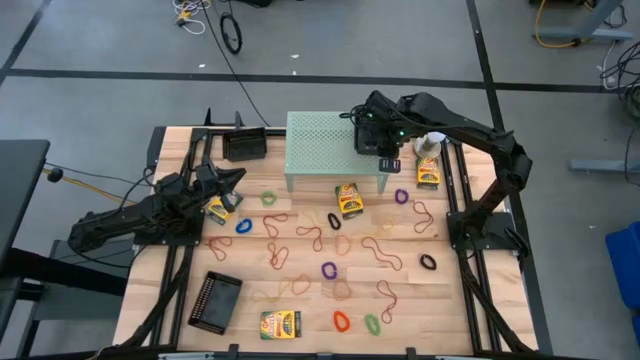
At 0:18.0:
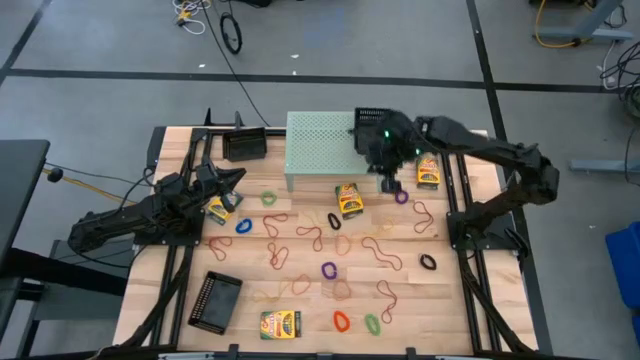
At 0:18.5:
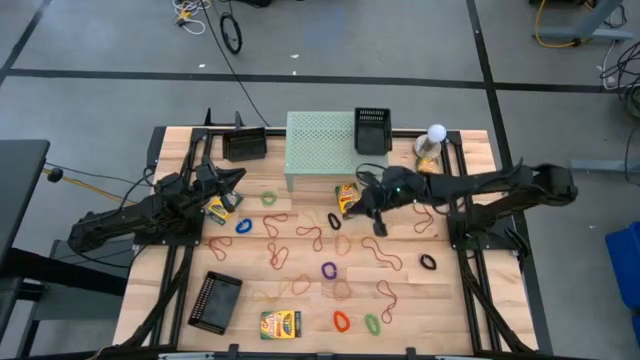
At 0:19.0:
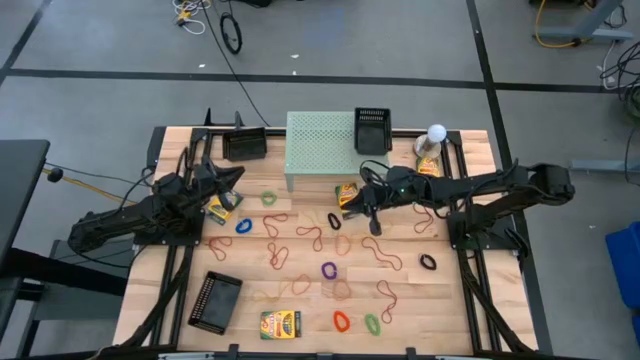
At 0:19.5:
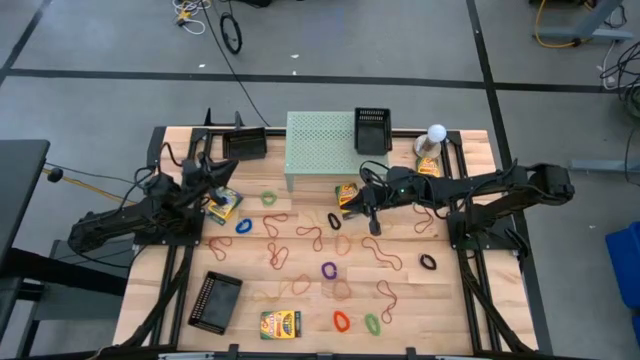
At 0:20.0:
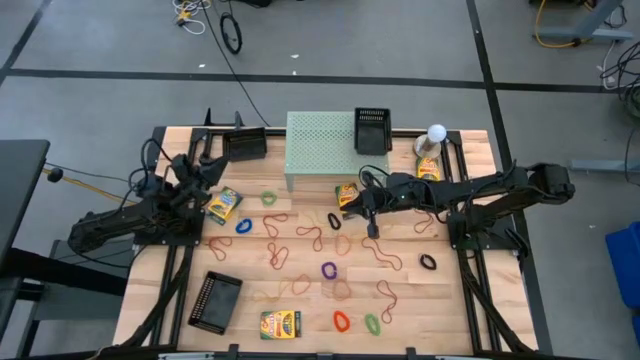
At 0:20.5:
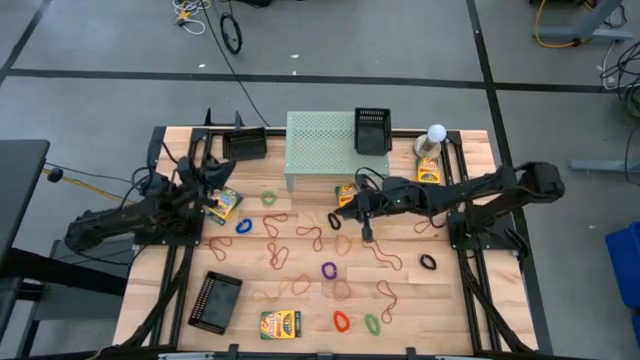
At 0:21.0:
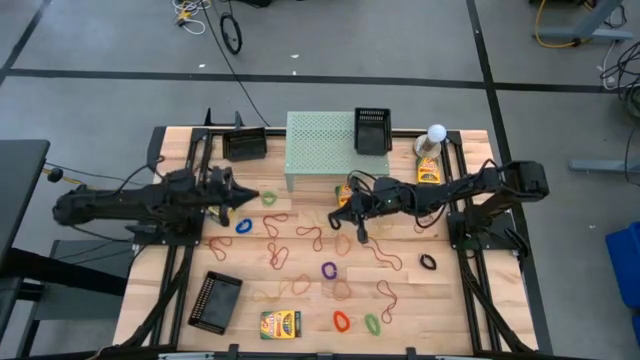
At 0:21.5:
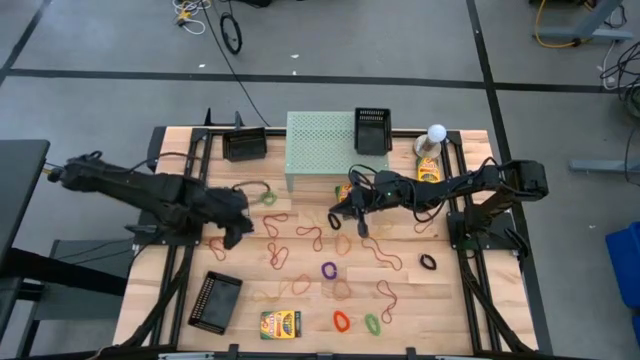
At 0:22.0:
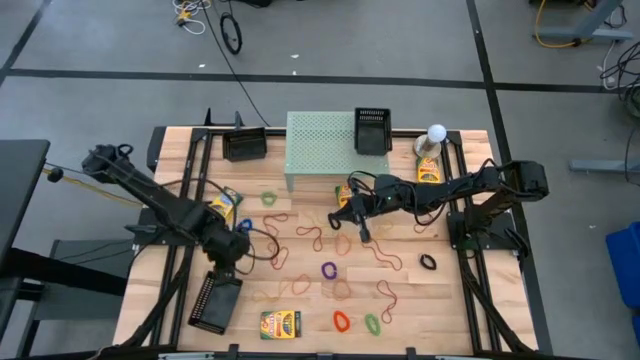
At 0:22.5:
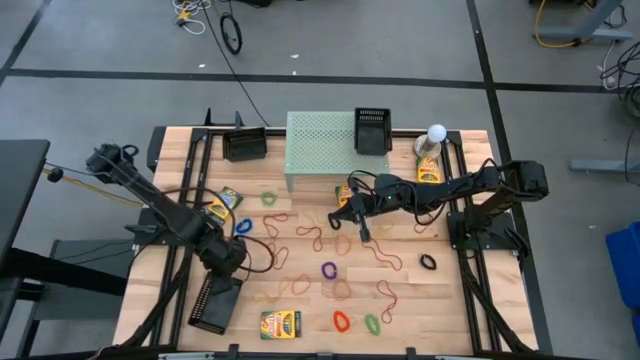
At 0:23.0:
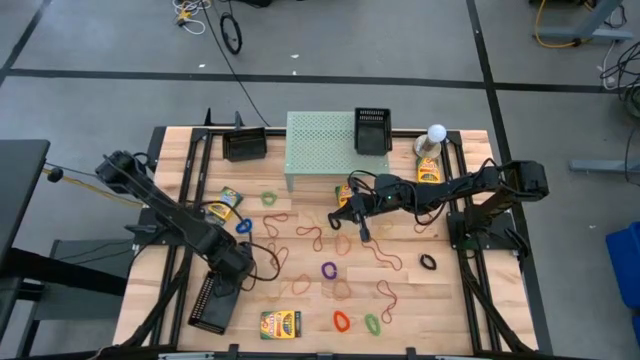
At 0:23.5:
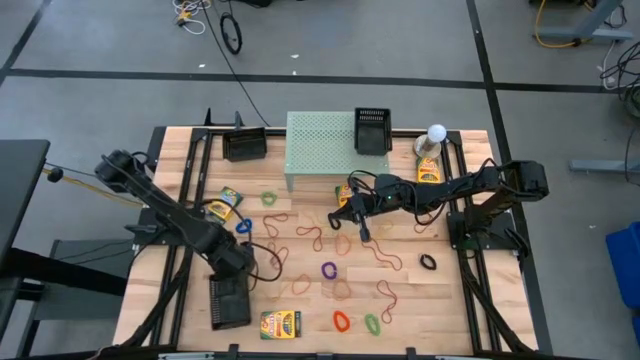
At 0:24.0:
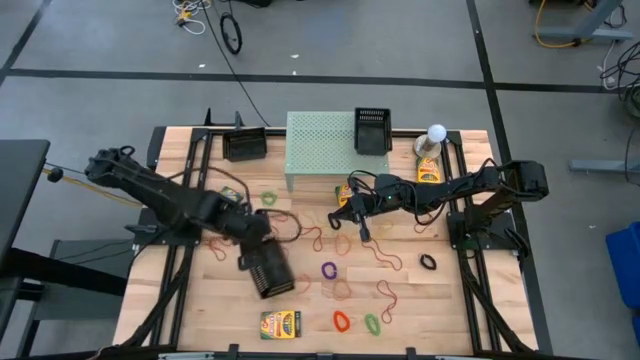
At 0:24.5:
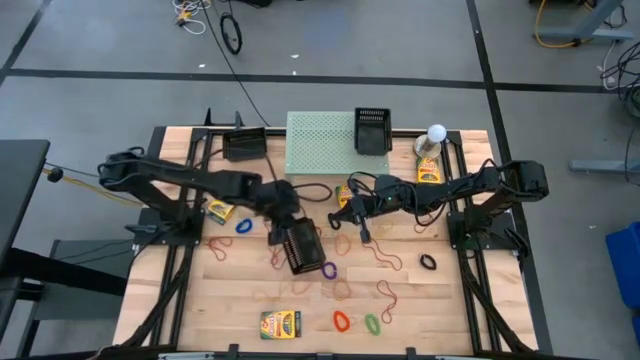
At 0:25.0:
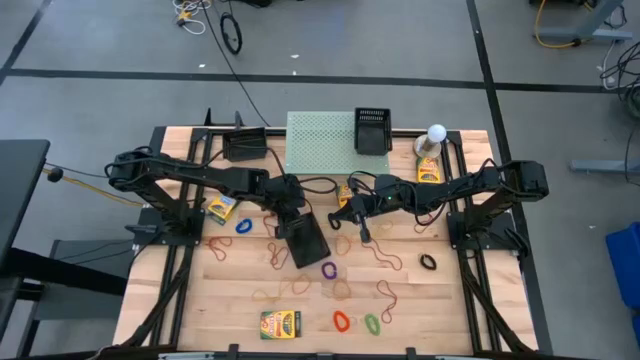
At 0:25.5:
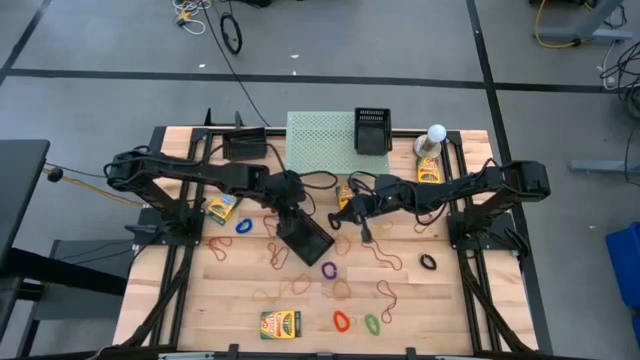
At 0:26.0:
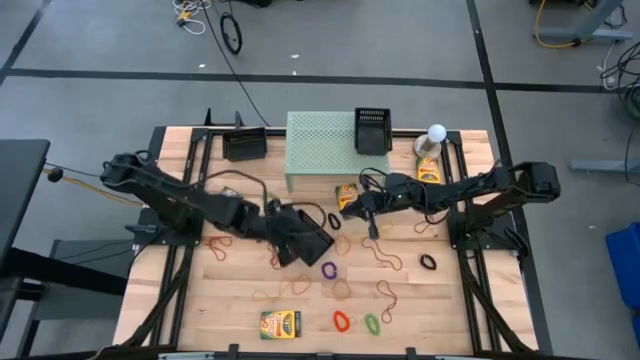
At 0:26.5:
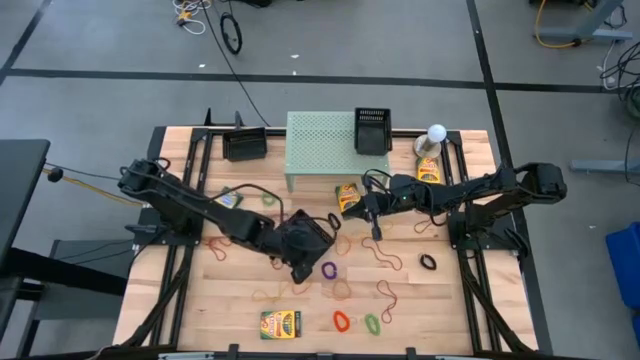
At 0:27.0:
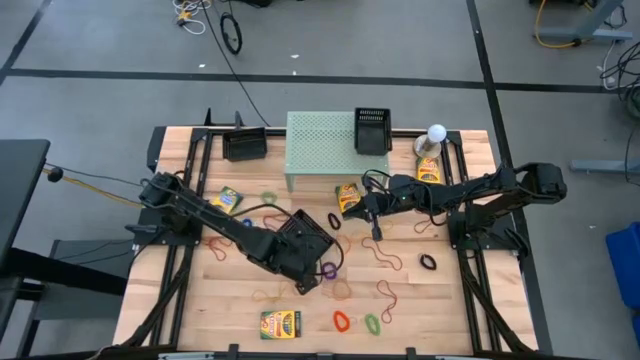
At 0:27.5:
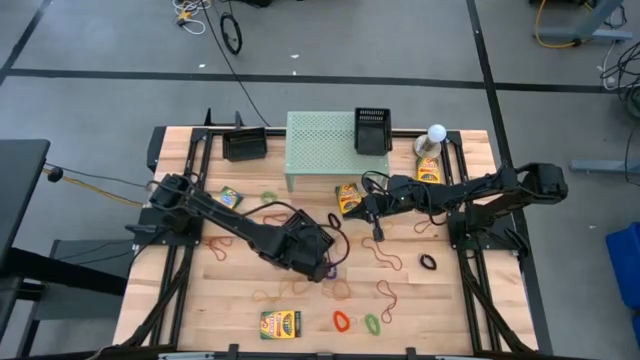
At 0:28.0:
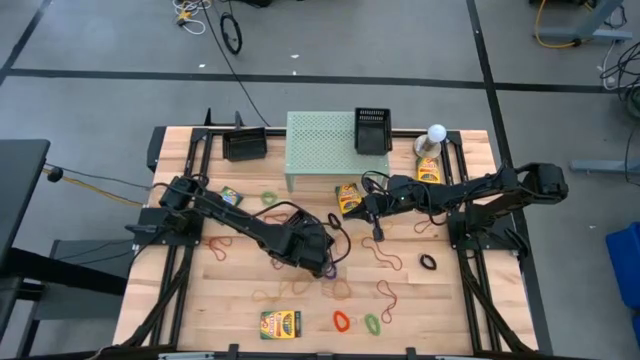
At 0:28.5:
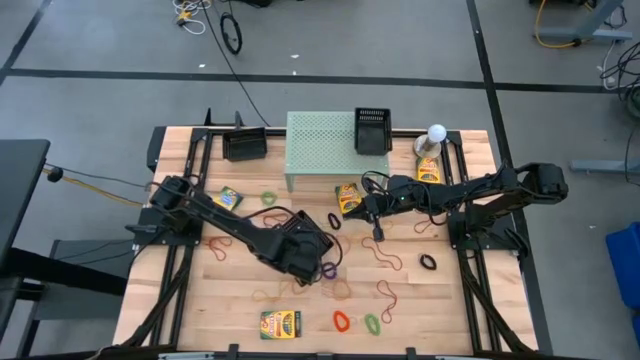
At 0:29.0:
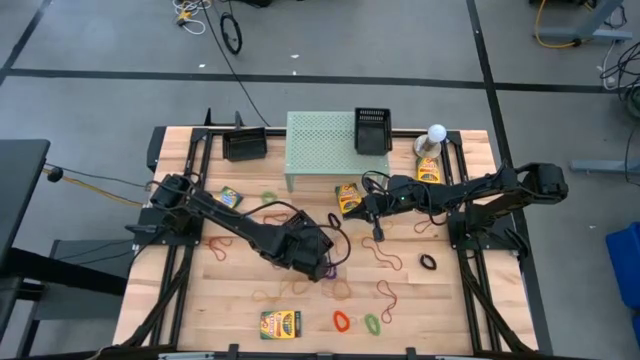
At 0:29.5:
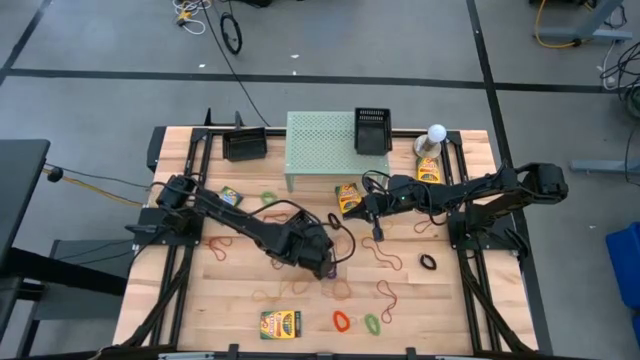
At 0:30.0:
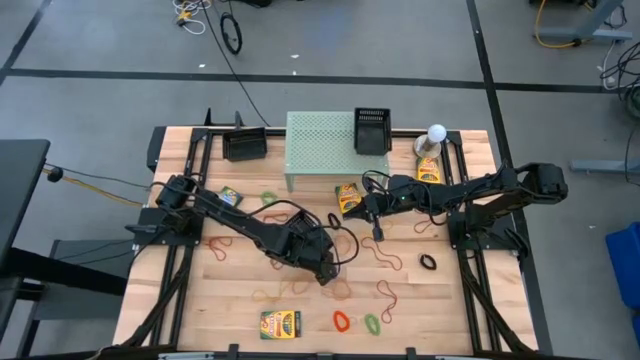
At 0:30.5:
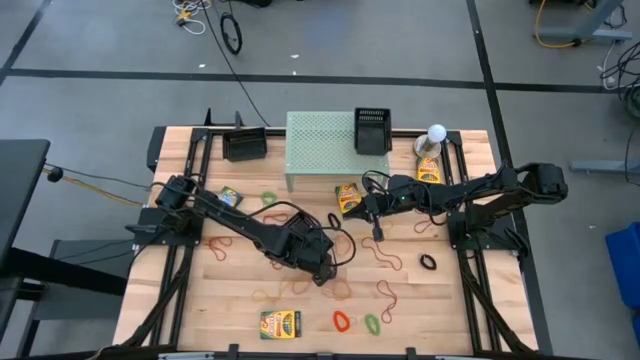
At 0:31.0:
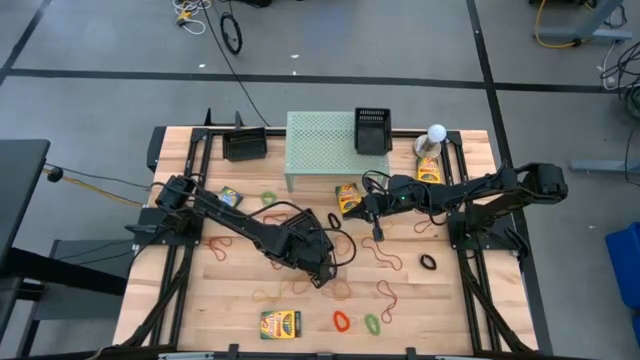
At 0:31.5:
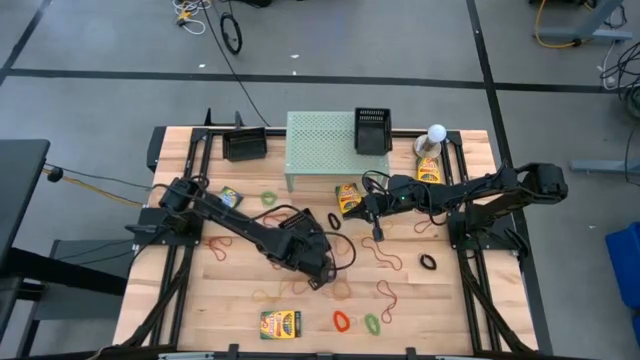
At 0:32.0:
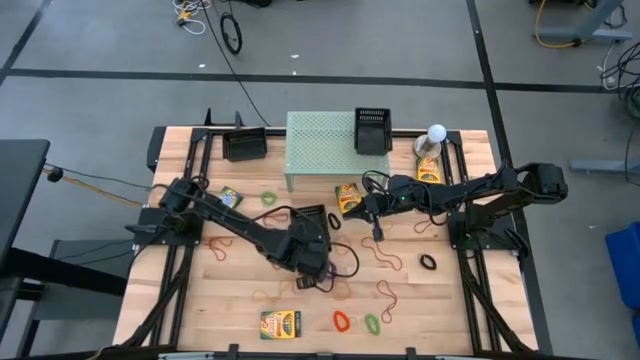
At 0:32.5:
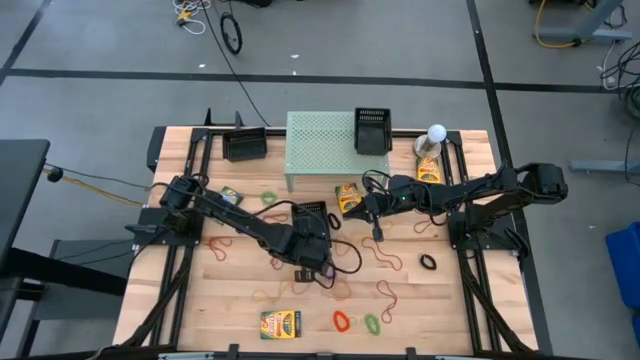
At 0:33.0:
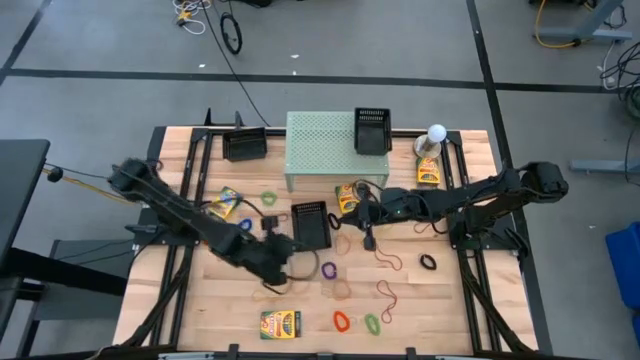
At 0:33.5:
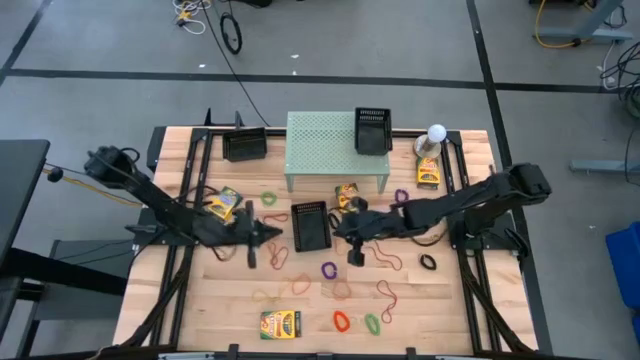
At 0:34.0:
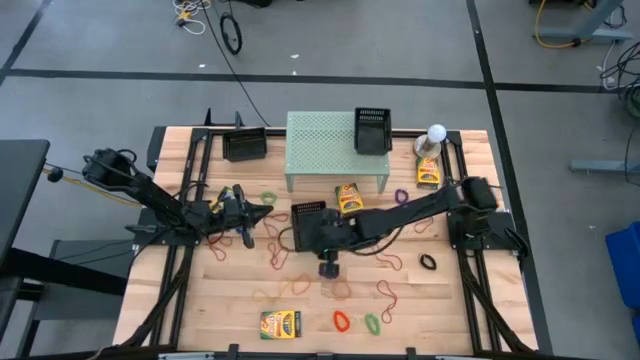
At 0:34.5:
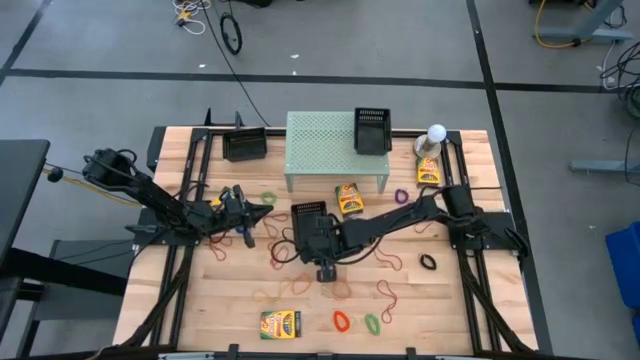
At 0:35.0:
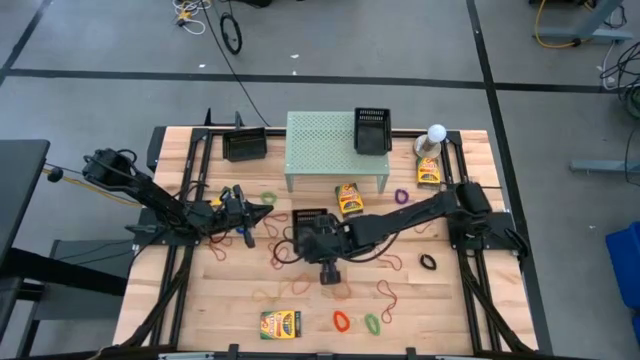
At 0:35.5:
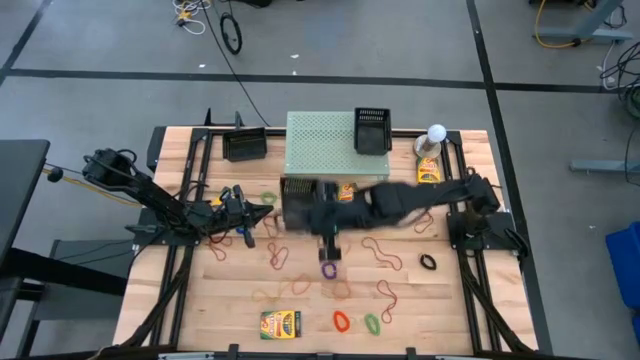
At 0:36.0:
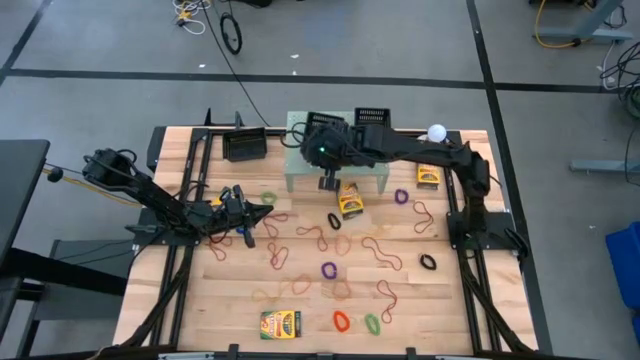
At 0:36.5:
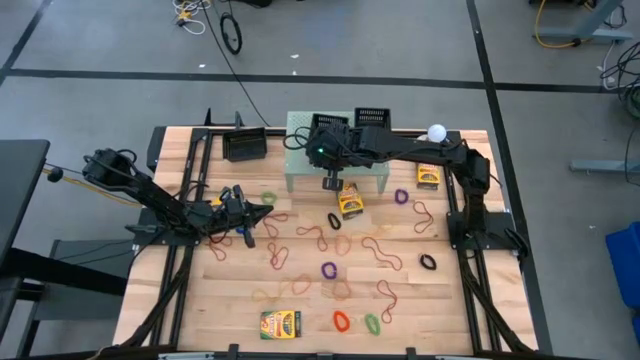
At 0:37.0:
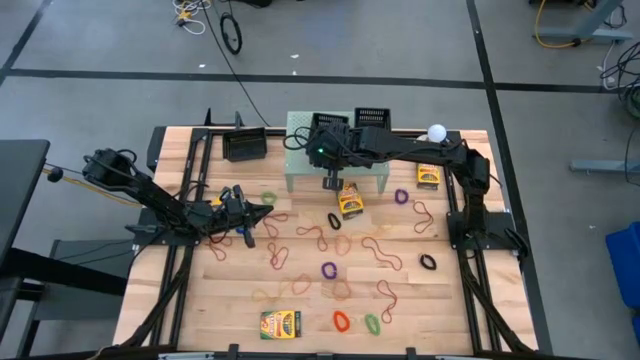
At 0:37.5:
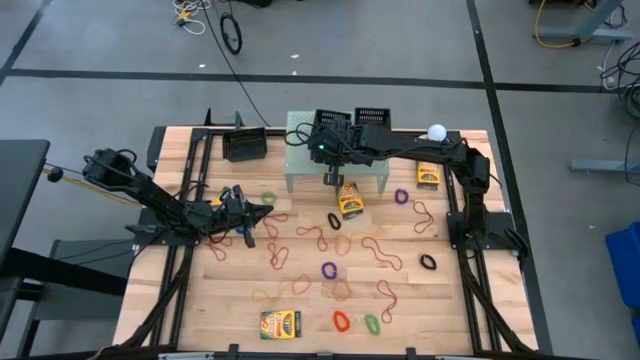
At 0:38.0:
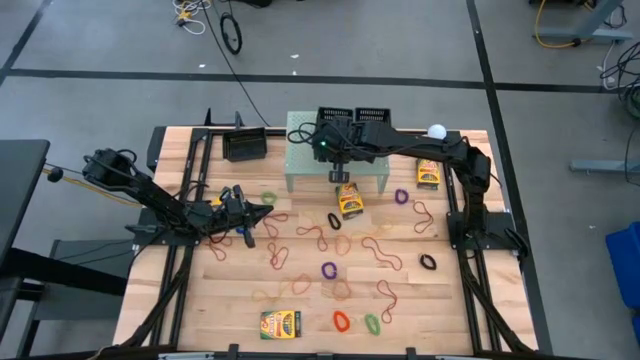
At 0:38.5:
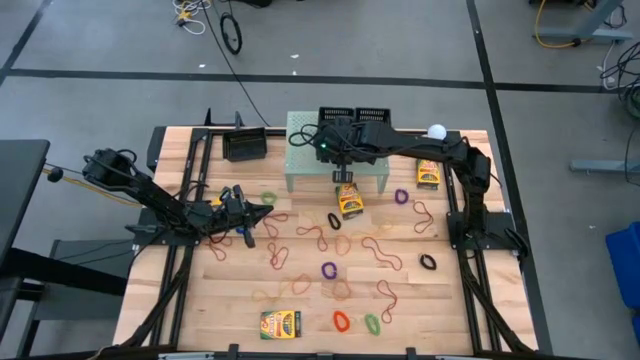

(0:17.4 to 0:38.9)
Task: Pick & Place Office Desk Supplies
Put the black bin on the shelf
